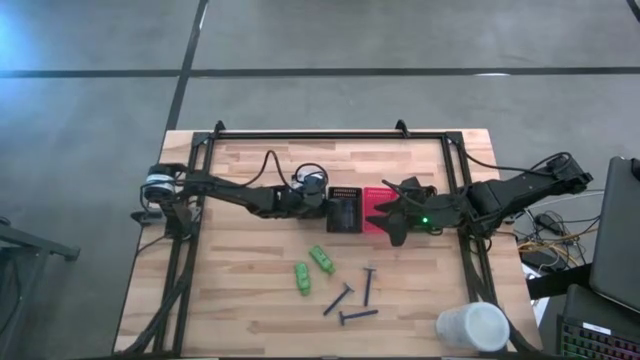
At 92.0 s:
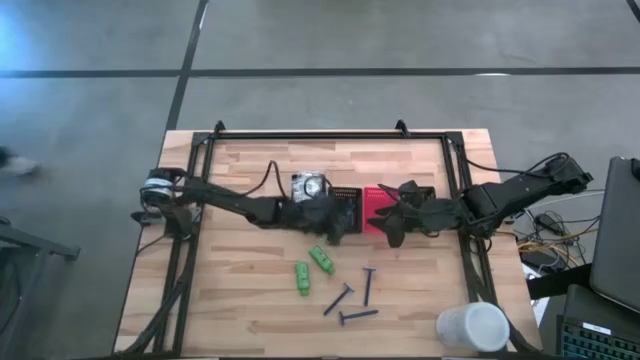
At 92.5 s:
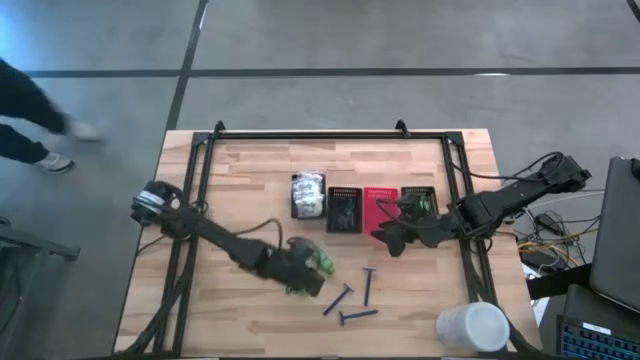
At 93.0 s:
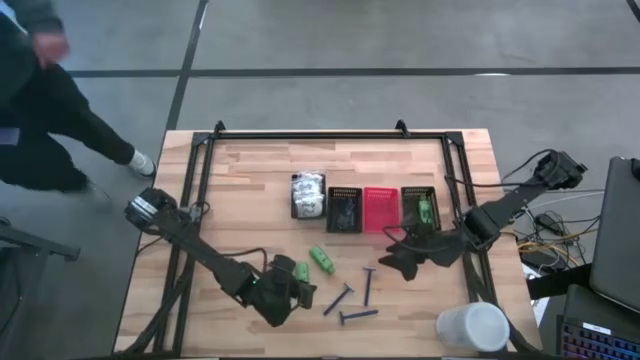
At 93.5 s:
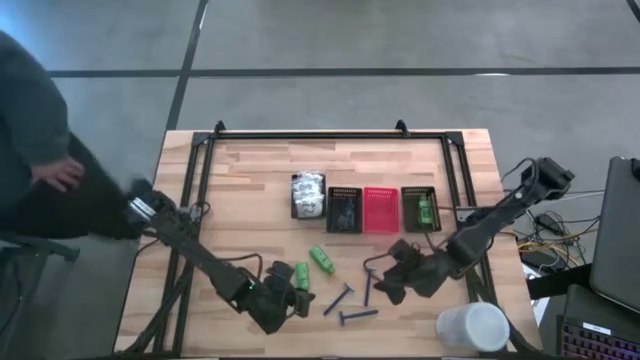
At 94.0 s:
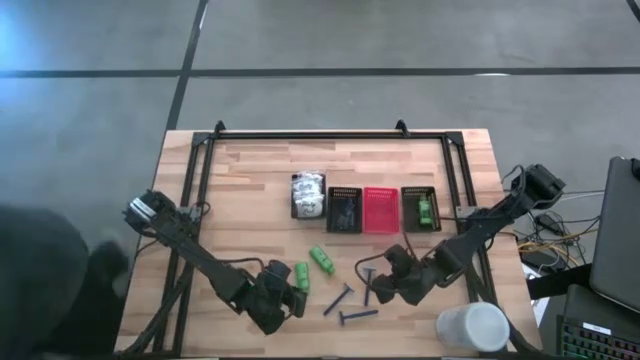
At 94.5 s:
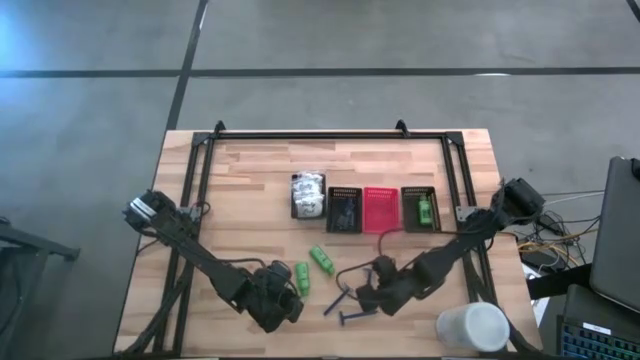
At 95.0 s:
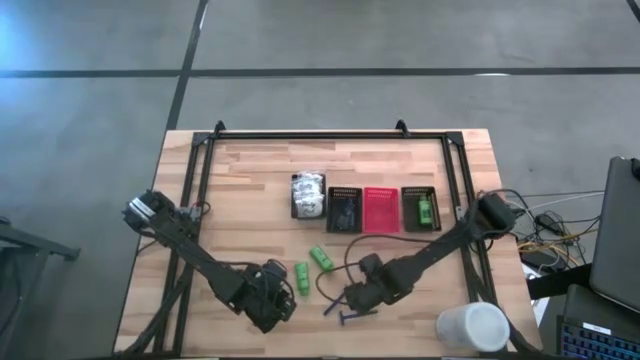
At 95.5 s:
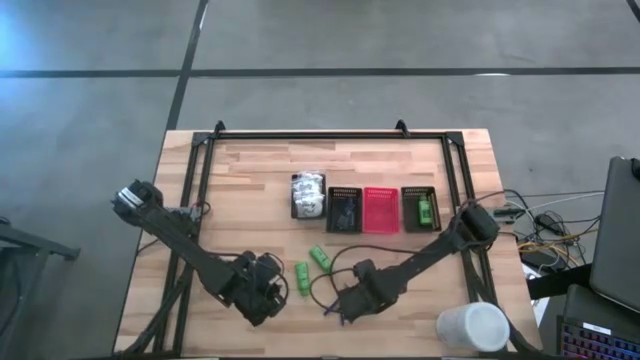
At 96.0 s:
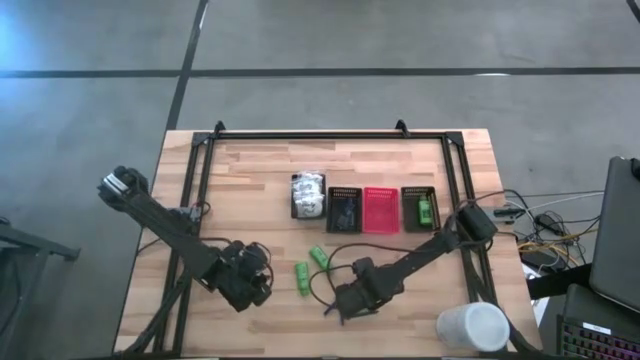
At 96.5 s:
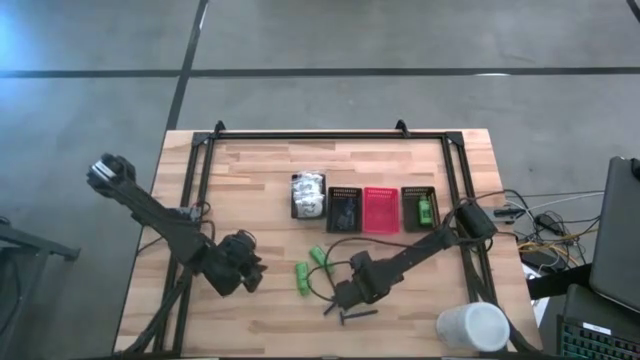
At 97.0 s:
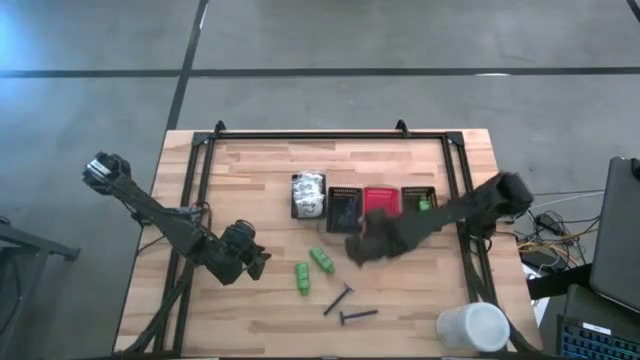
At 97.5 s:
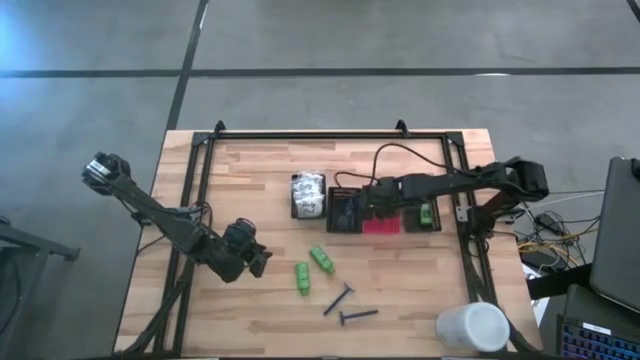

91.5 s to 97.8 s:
Task: Pick & Place Travel size toiletries
Put the blue razor into the red bin

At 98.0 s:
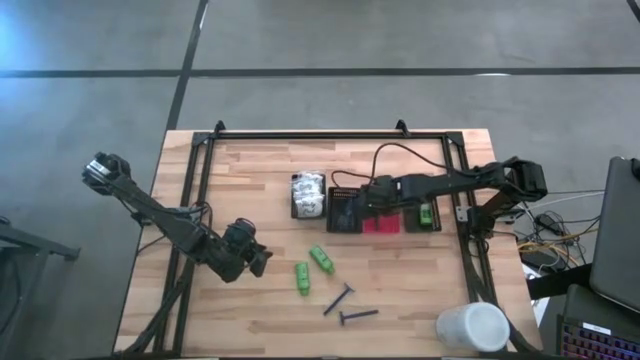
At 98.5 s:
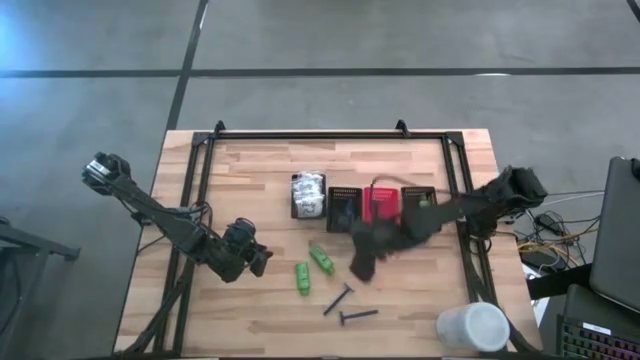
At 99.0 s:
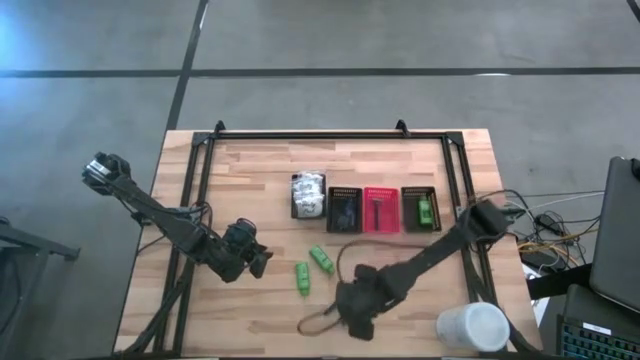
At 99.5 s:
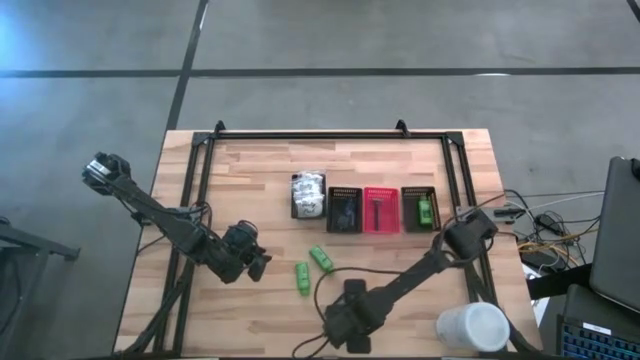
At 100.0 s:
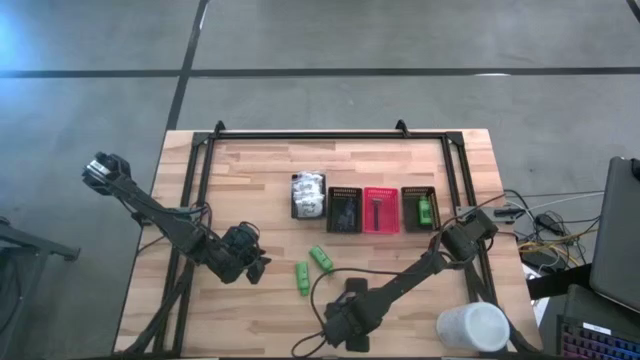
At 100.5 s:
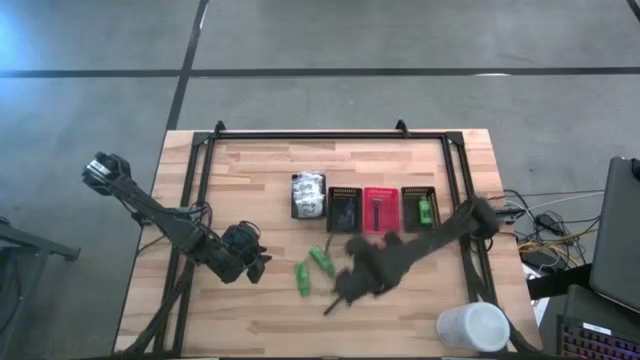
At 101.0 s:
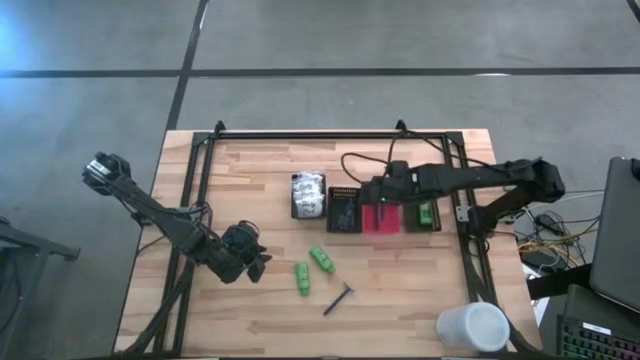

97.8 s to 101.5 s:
Put the blue razor into the red bin

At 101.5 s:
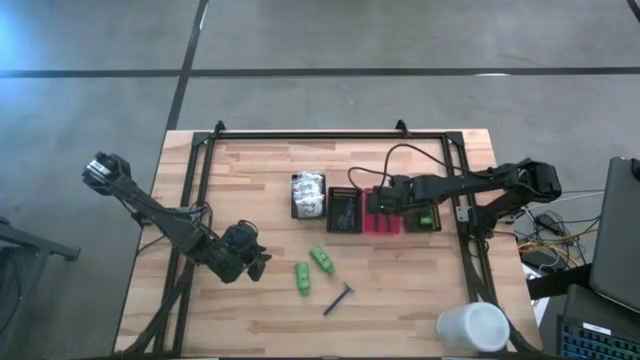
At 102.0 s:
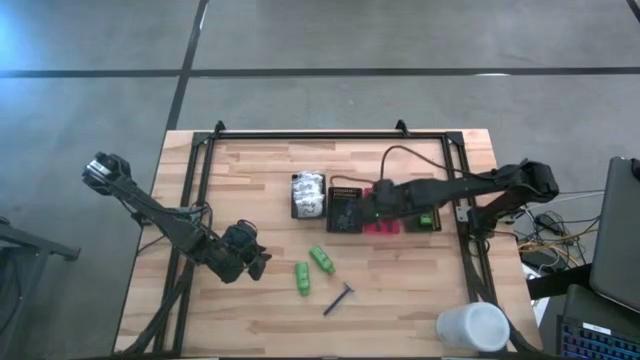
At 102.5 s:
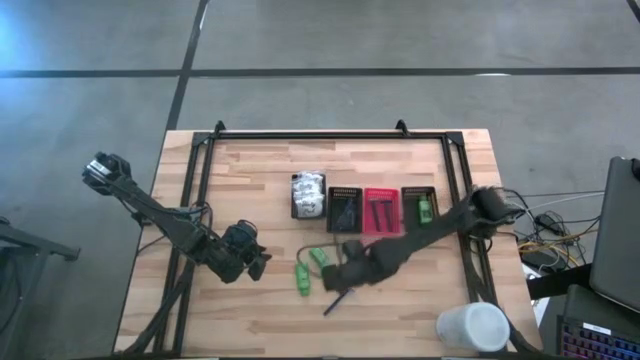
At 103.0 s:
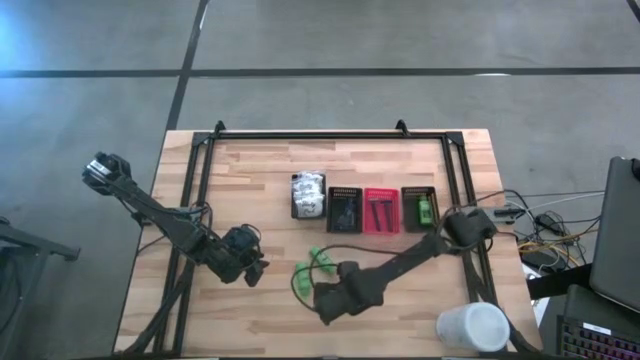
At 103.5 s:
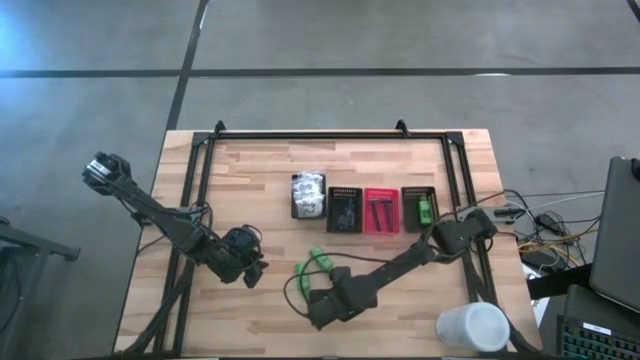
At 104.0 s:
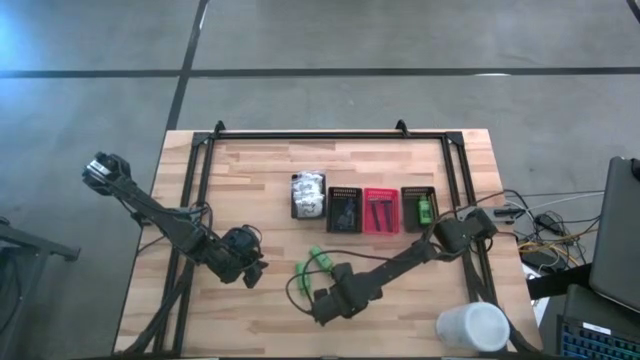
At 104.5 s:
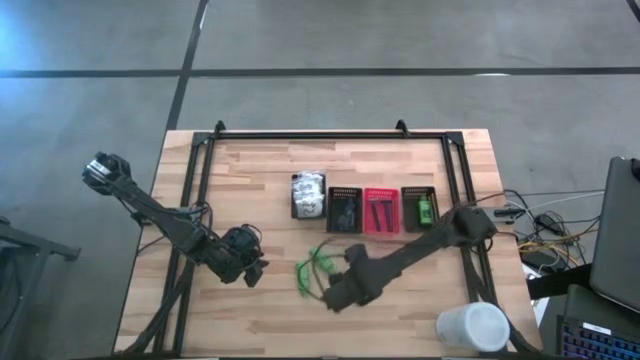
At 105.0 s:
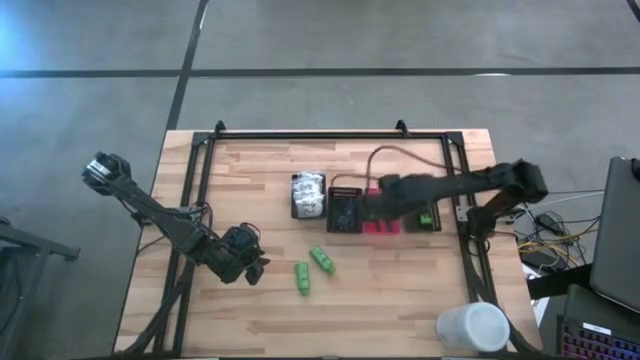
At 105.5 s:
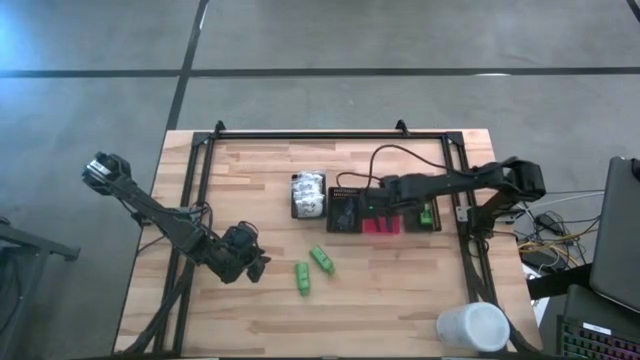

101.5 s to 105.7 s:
Put the blue razor into the red bin

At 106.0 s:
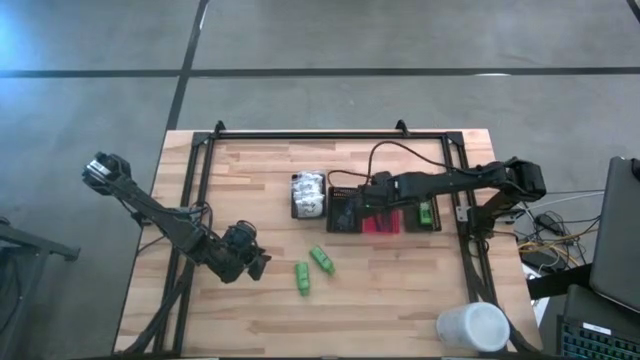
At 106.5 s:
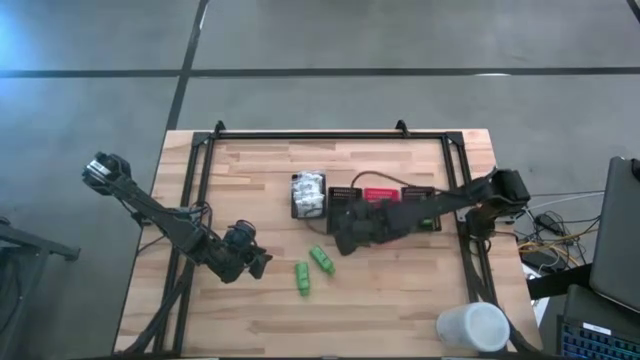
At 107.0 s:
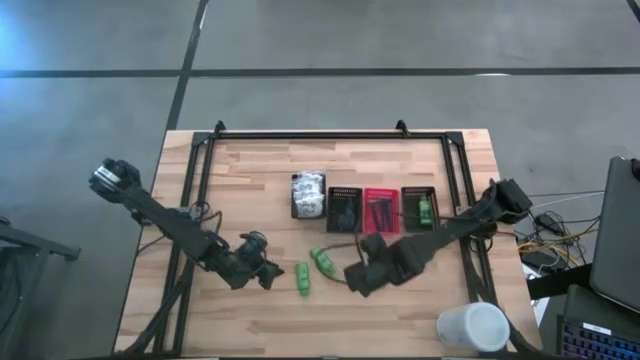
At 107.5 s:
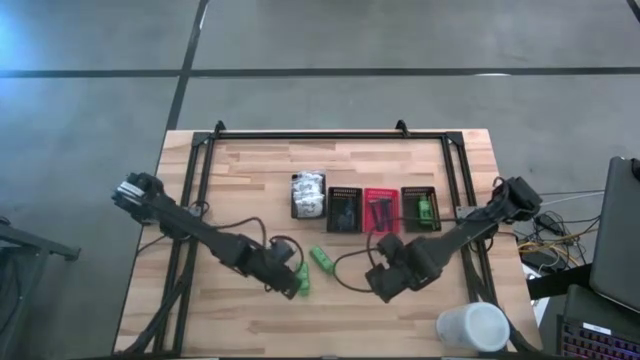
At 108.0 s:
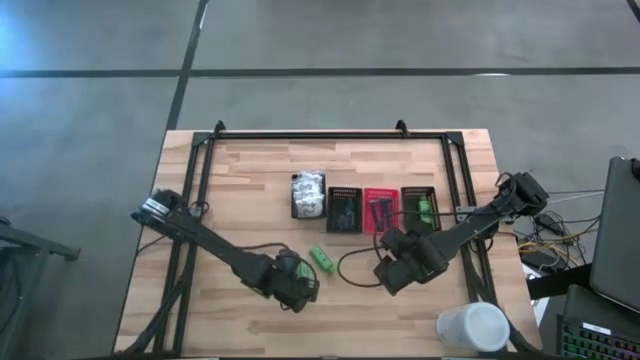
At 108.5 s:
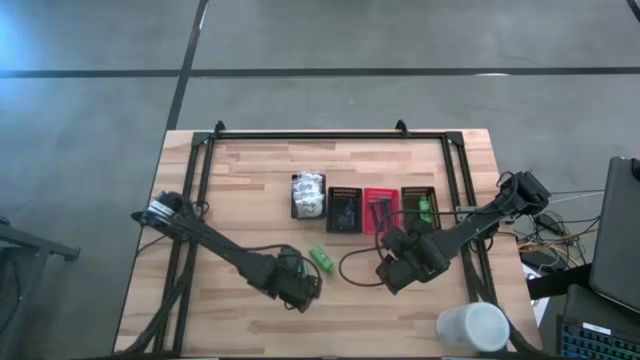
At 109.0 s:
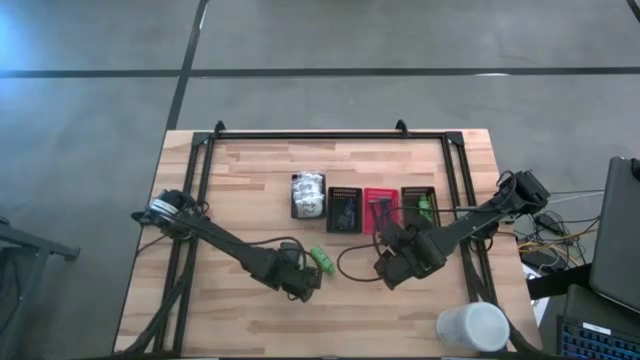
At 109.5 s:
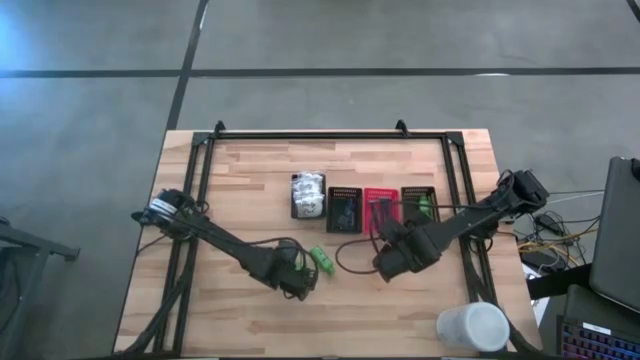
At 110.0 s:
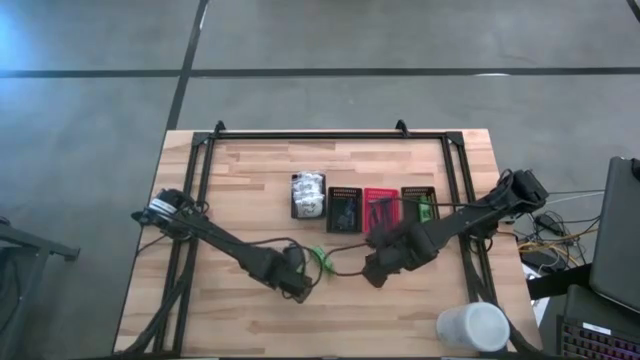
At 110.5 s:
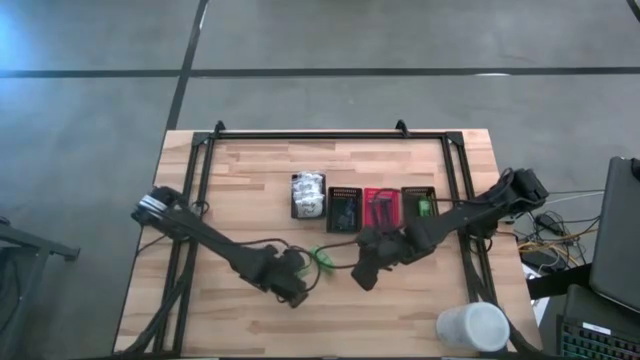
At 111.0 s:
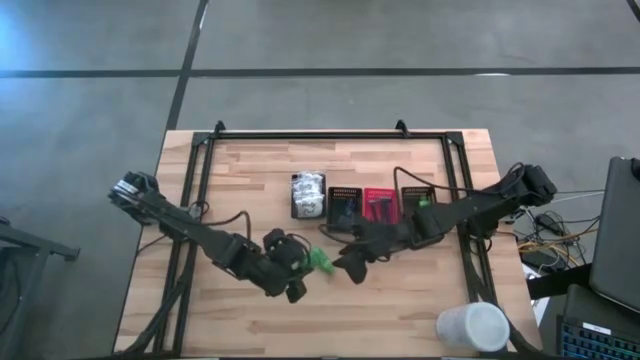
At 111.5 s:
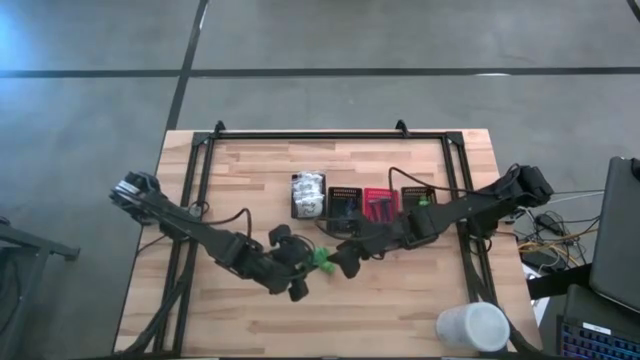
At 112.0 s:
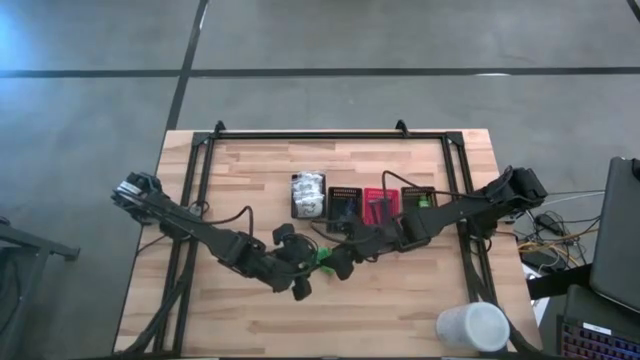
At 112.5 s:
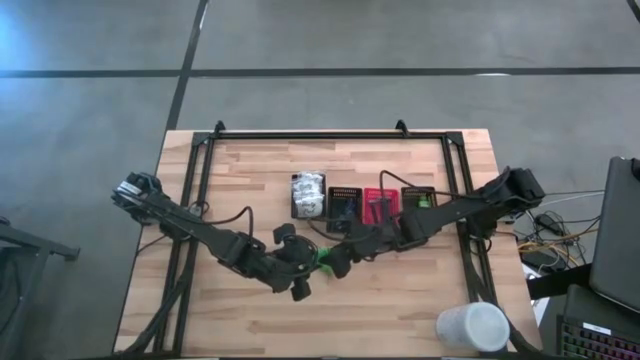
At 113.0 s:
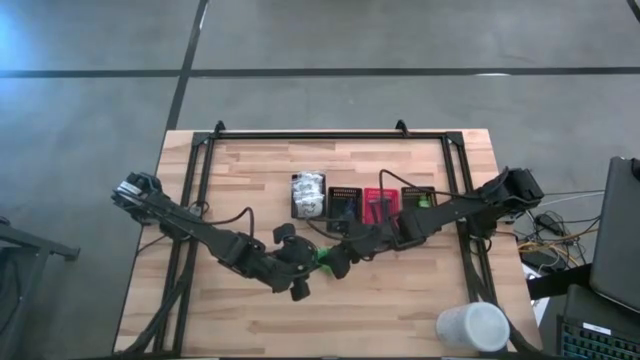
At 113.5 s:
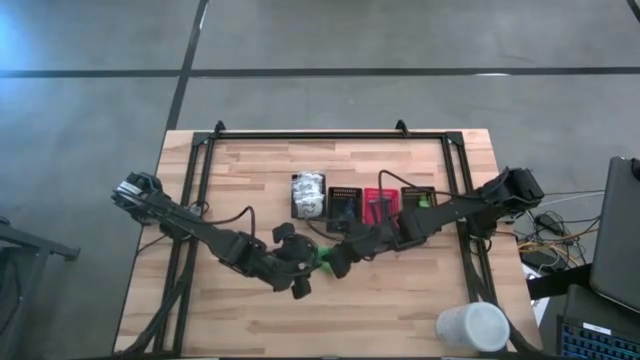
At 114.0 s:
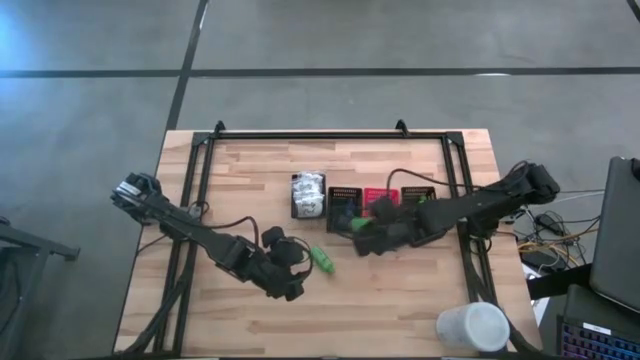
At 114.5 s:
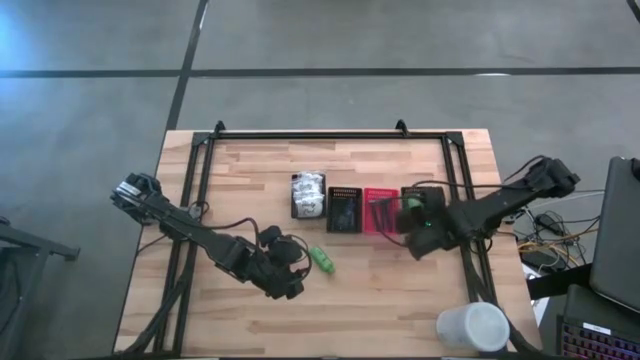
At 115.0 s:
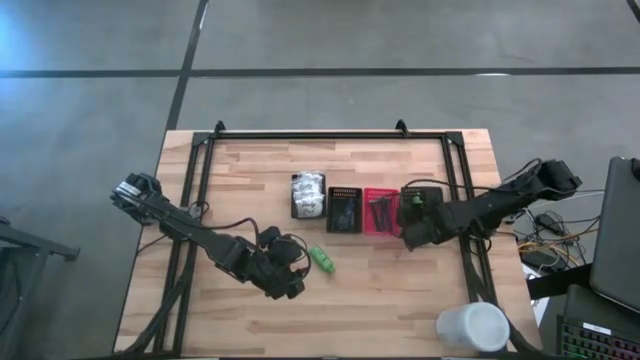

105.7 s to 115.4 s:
Put the green shampoo into the right black bin
